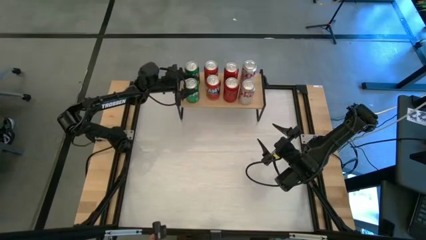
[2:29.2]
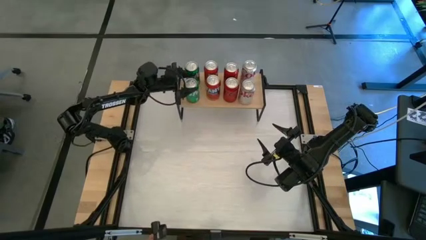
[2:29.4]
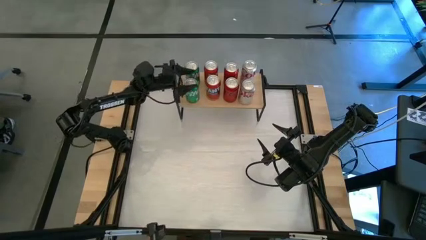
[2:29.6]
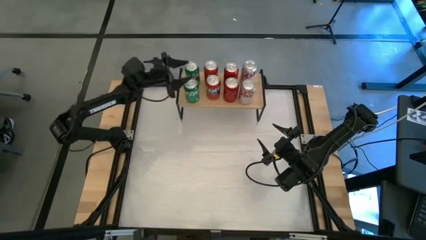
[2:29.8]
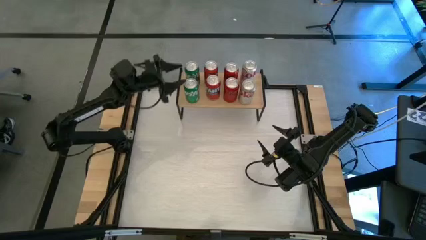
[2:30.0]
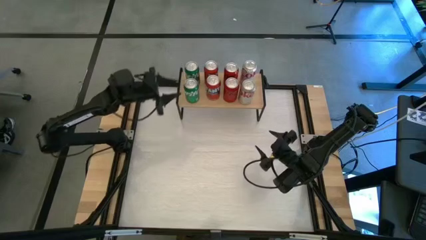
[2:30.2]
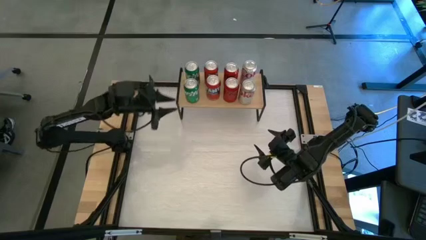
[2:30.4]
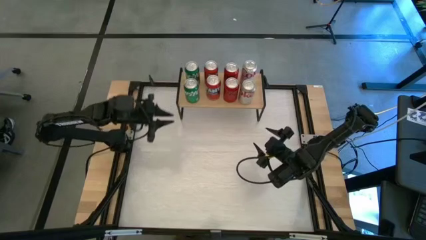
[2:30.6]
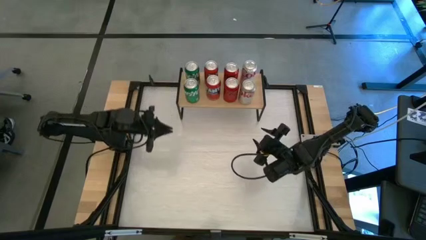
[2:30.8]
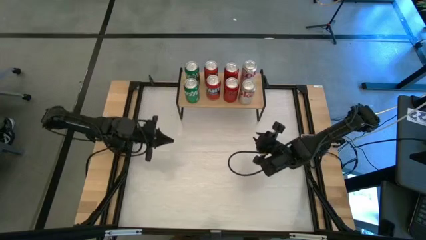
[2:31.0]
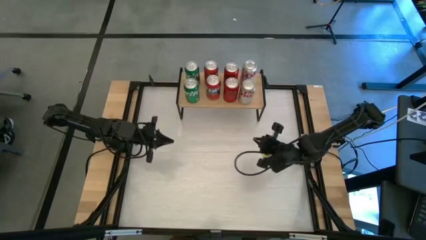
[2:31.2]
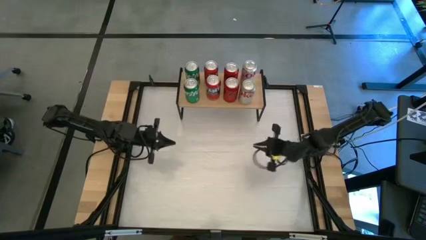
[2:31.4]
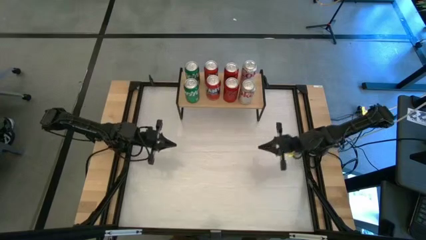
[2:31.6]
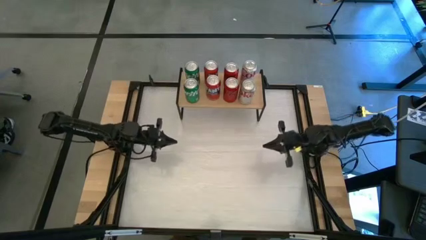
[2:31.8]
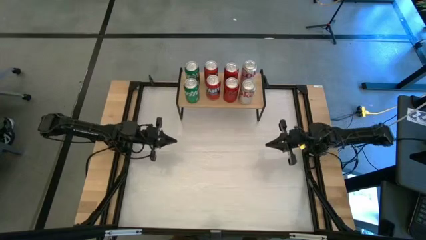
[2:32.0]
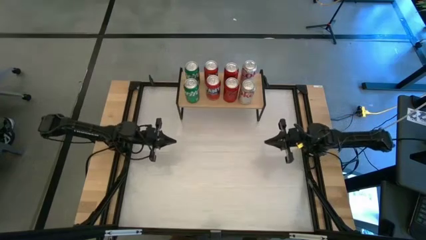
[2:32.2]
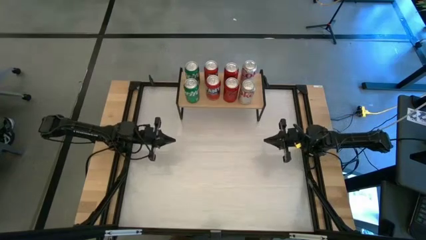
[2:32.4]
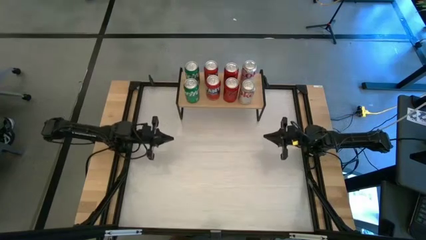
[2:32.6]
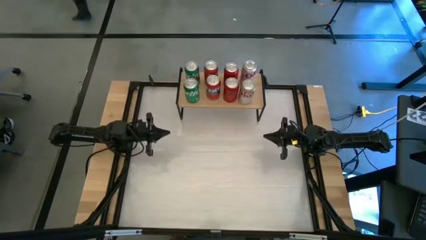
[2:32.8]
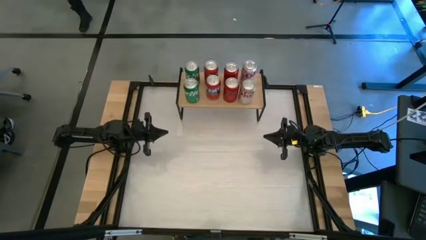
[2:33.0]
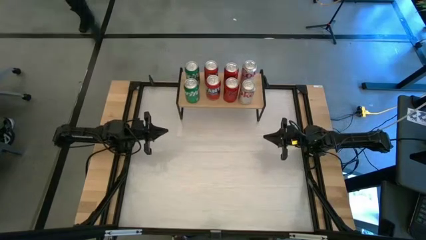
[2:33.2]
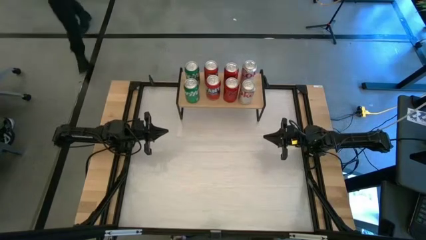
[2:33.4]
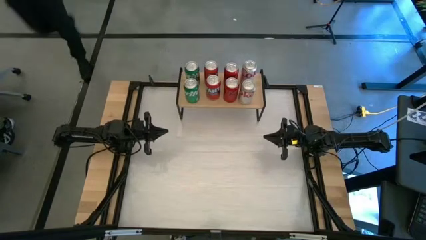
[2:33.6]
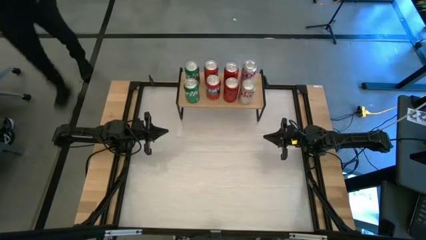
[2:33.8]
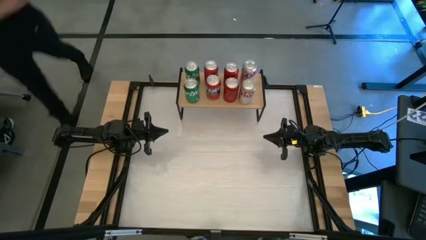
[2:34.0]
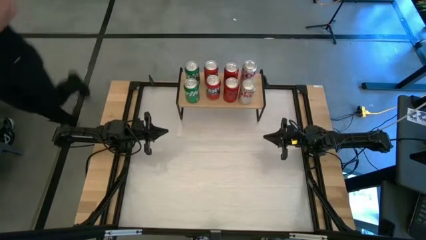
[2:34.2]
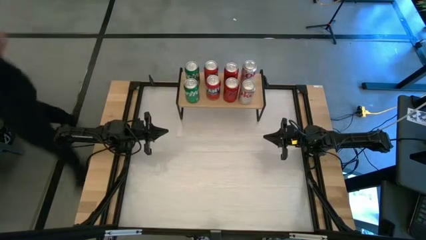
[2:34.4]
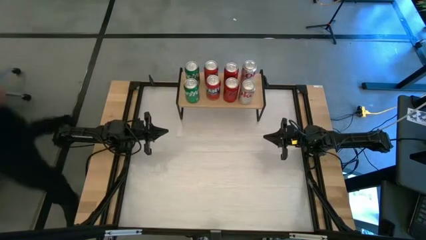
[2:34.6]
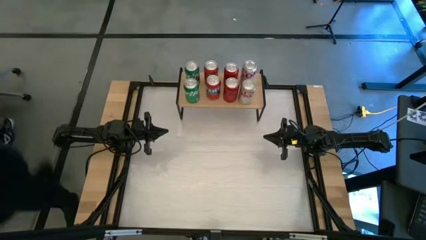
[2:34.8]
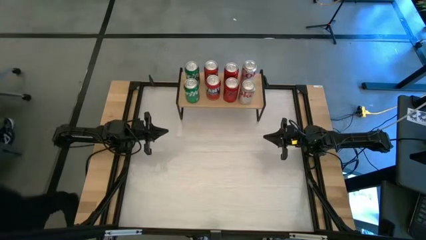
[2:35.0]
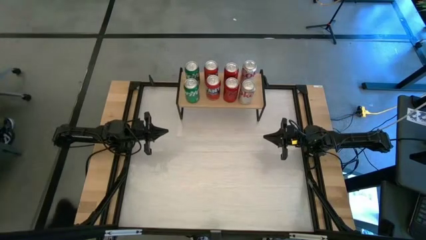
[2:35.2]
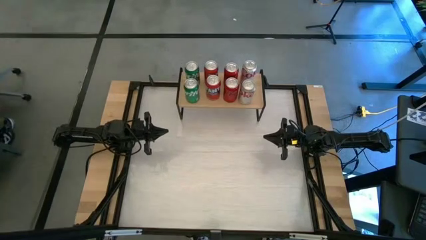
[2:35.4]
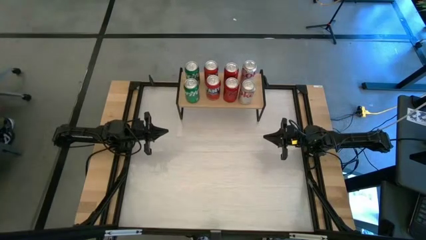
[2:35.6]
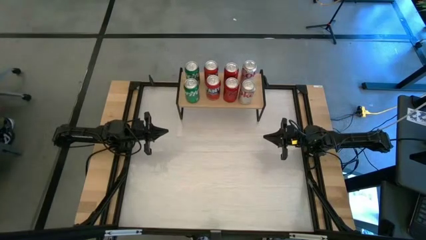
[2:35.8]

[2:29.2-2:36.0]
Task: Place canned beverage on shelf
Return to Home Position

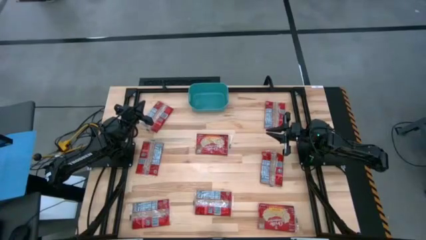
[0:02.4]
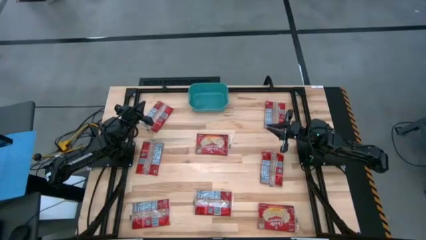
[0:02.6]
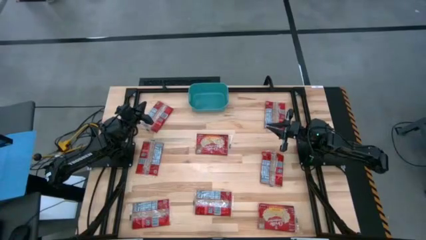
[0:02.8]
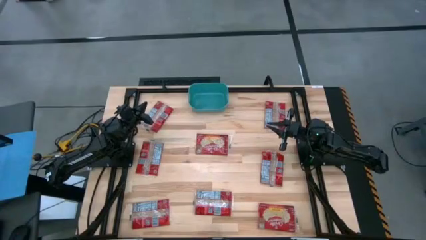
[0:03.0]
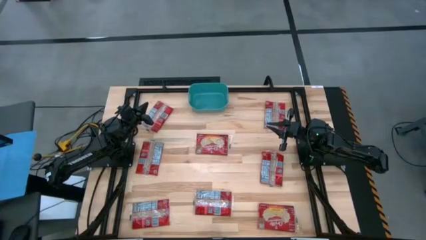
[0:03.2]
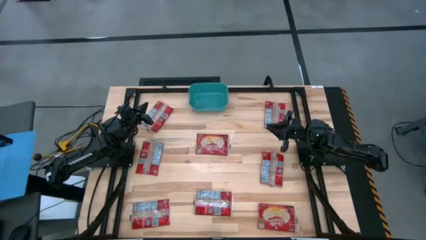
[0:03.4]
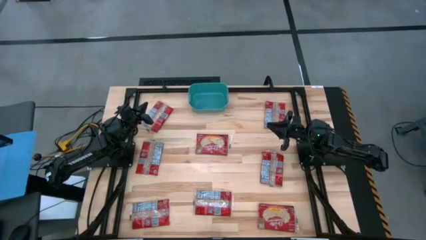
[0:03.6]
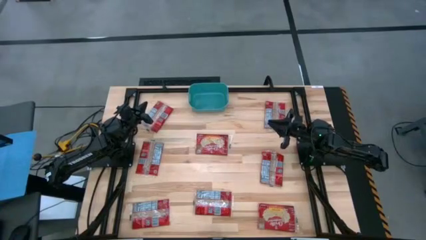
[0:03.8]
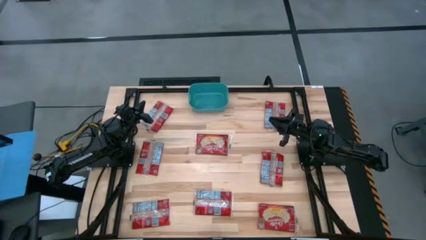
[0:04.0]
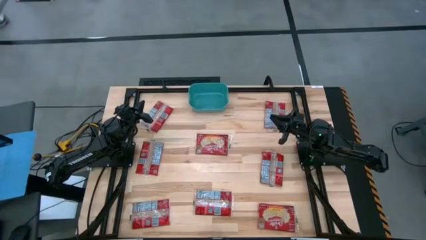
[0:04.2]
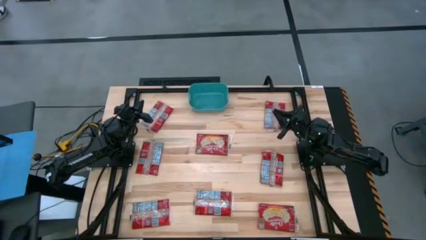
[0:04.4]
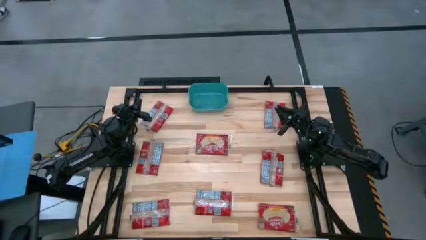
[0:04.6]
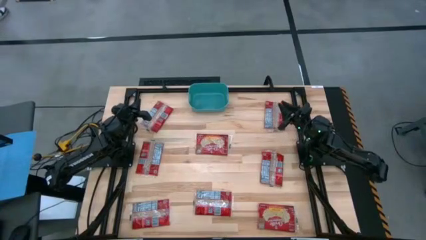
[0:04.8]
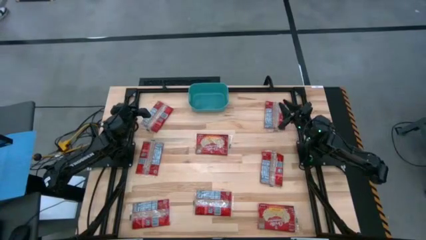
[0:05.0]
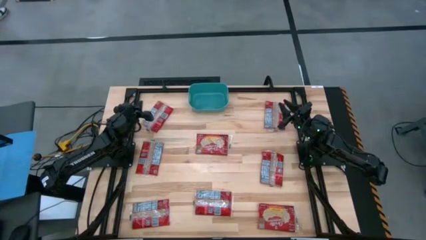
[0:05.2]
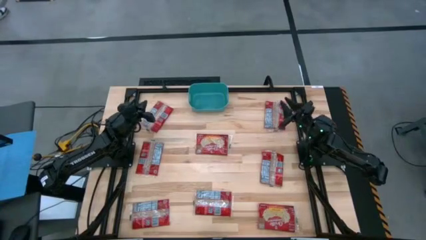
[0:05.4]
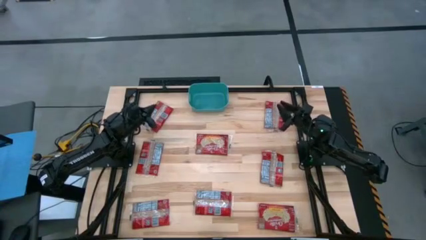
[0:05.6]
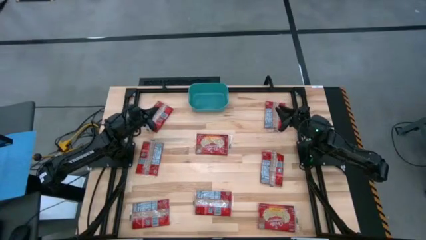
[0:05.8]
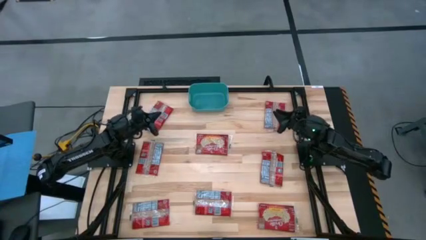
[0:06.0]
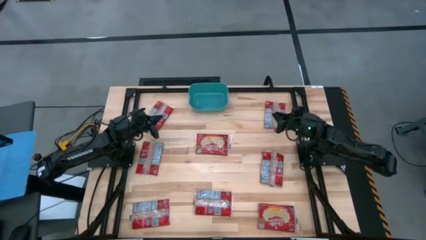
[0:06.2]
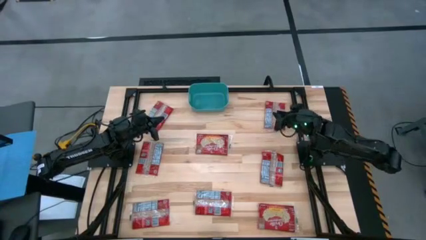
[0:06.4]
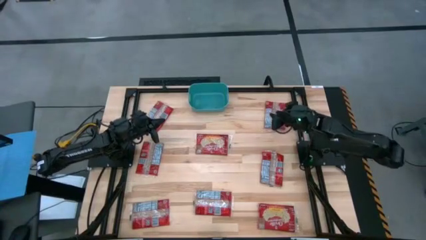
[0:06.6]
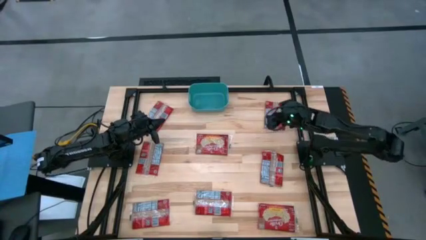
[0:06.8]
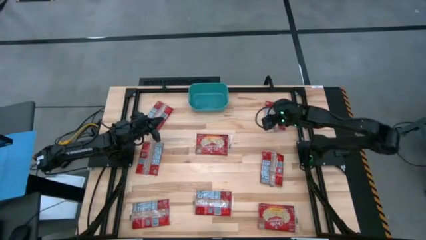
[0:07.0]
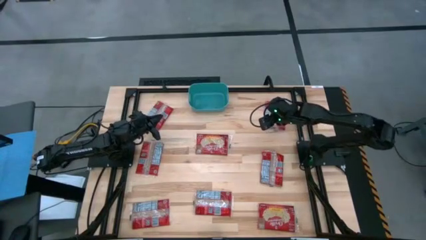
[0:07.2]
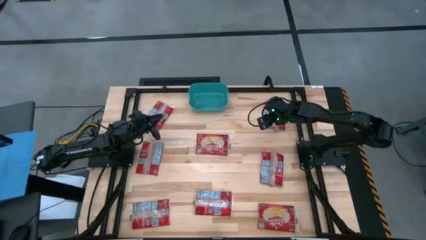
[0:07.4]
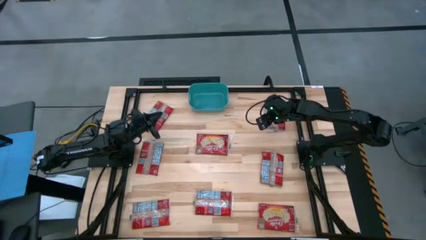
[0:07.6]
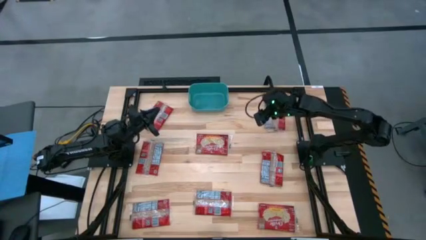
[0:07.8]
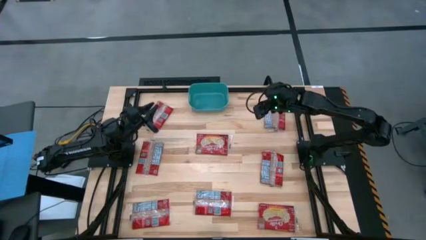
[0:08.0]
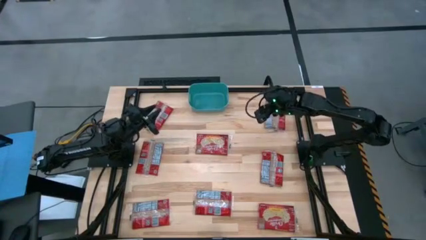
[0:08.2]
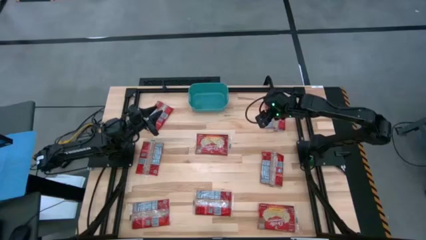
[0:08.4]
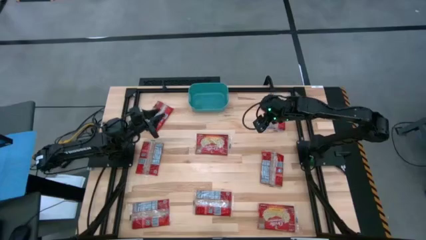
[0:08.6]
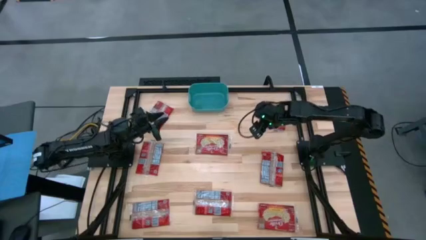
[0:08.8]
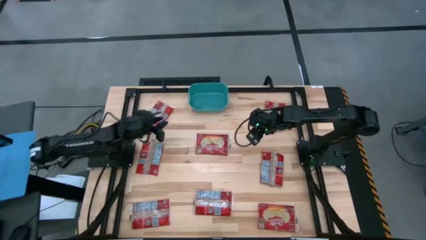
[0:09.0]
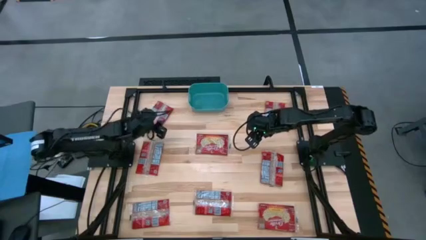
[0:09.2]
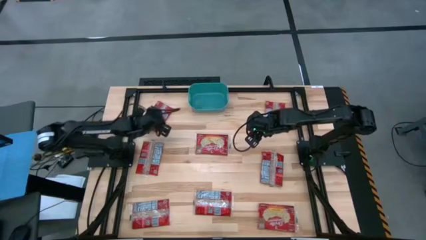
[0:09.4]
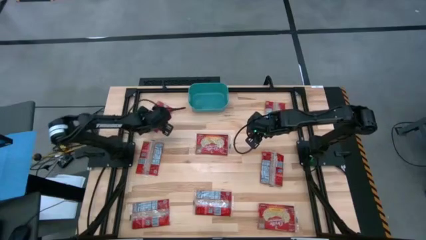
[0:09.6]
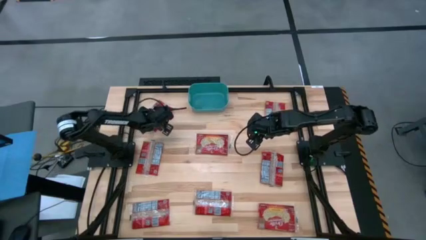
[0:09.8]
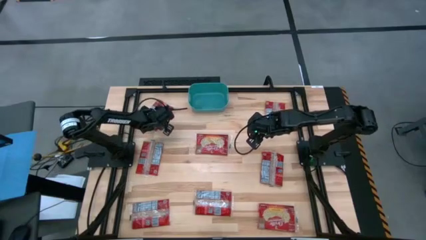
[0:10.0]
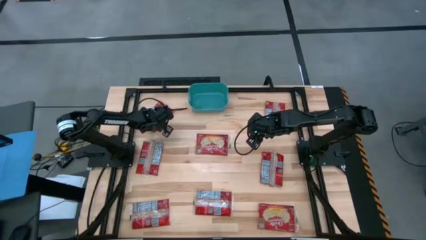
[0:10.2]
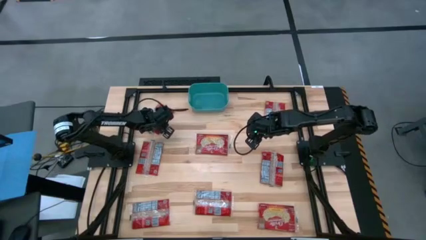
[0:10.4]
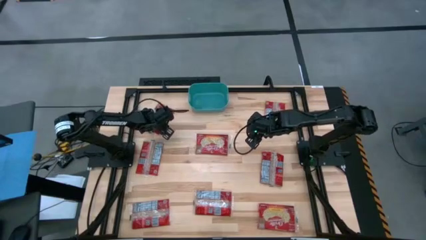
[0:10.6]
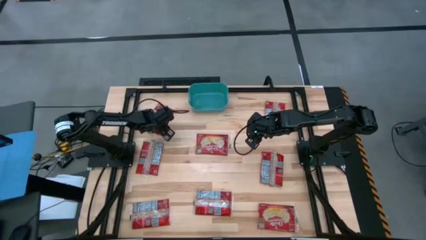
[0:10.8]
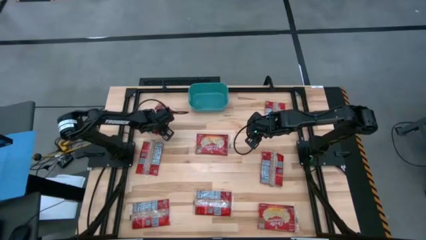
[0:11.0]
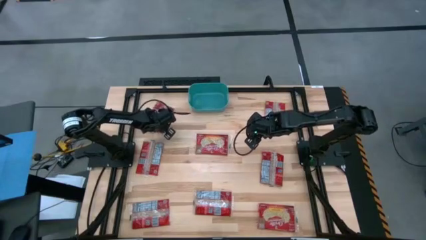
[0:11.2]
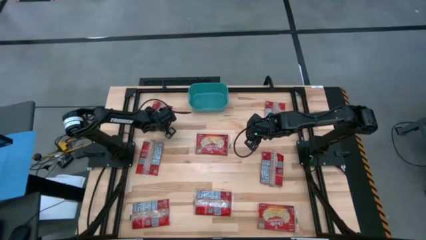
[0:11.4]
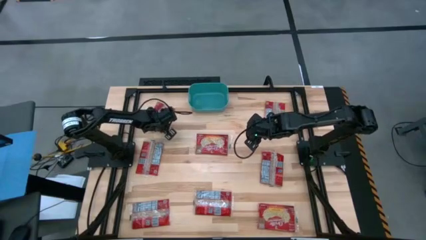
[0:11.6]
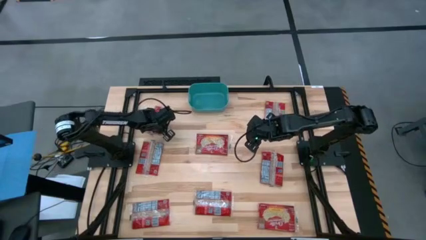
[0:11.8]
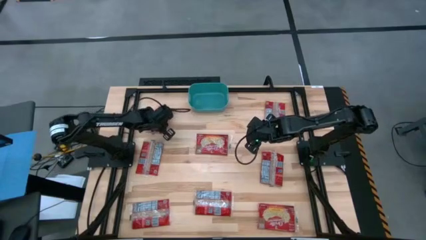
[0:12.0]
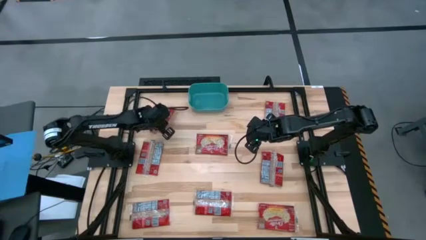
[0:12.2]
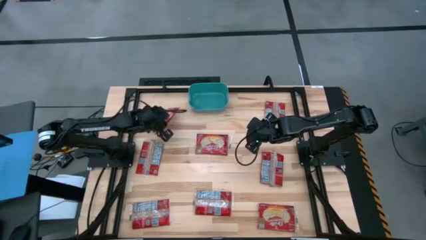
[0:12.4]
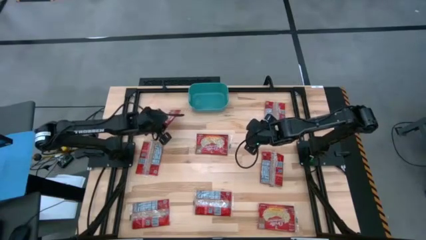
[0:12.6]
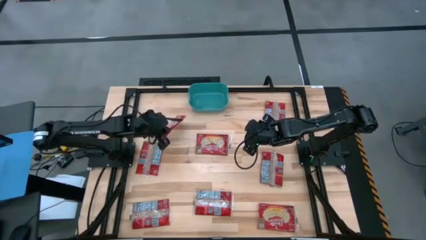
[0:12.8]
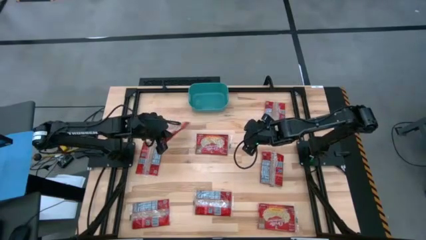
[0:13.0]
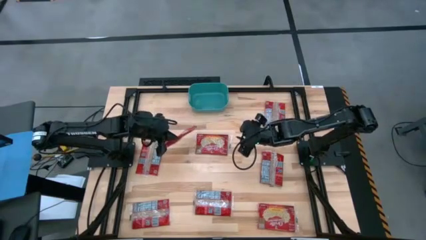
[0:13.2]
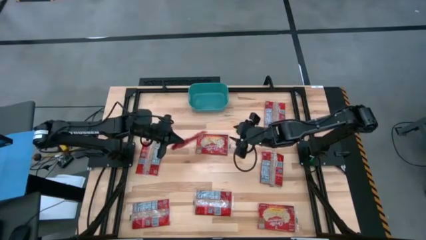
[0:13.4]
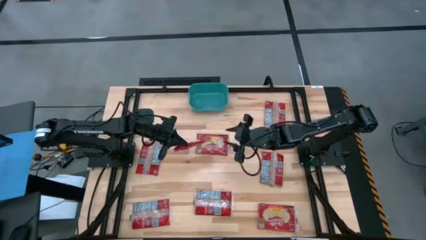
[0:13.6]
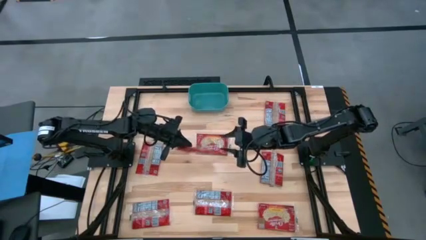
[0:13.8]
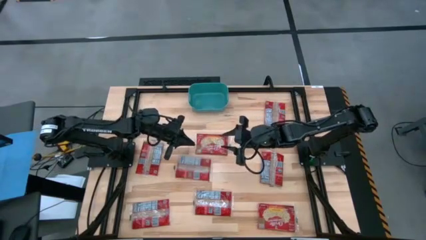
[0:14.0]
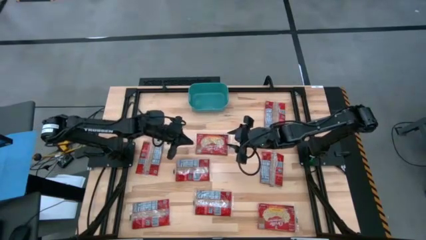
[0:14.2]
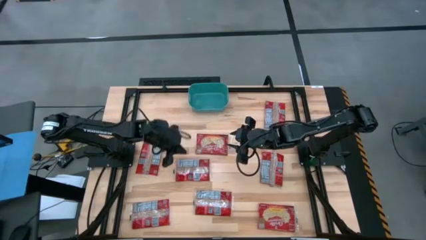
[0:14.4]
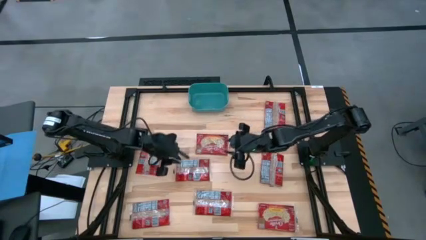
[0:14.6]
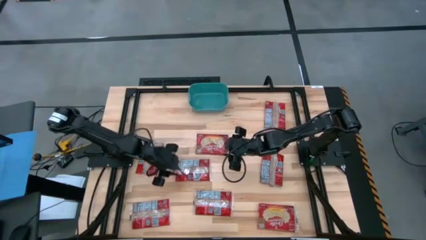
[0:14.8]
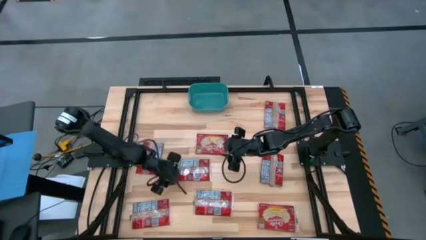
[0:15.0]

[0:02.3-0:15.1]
Task: Sort popcorn bags into baskets
Put the red popcorn bag into the green basket
